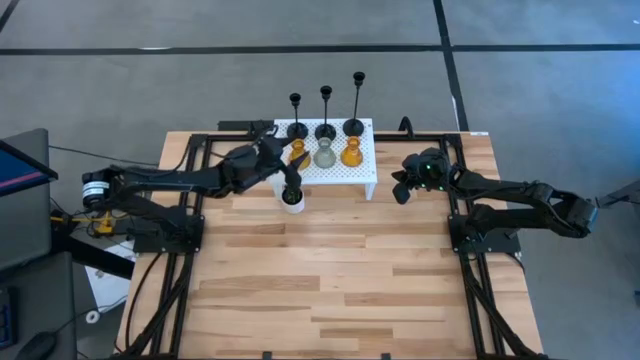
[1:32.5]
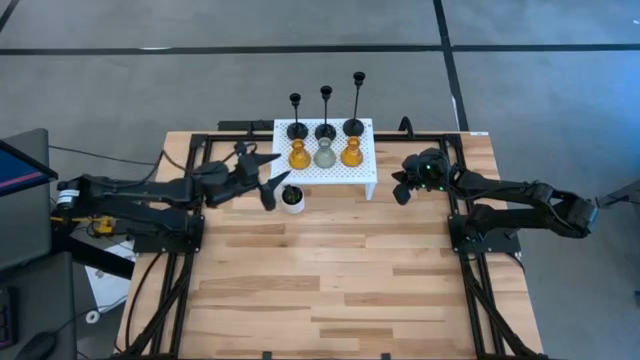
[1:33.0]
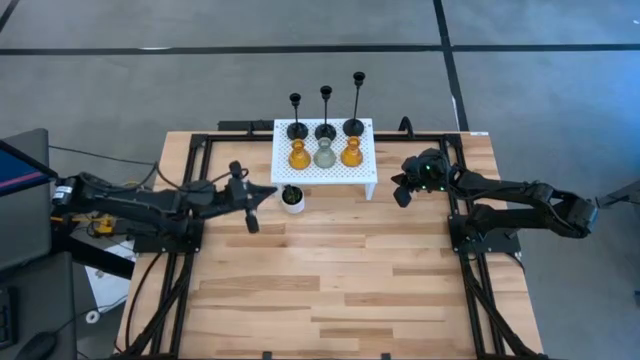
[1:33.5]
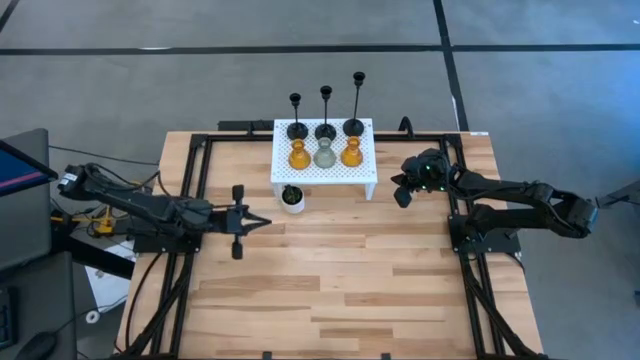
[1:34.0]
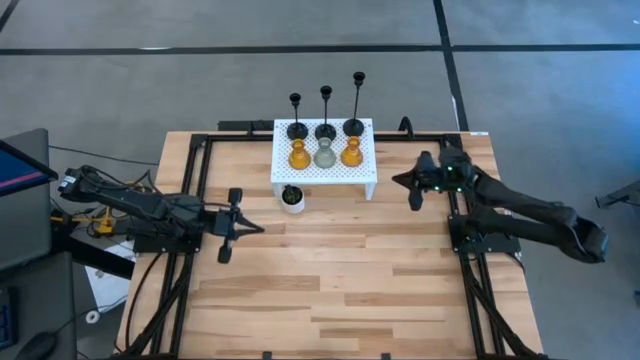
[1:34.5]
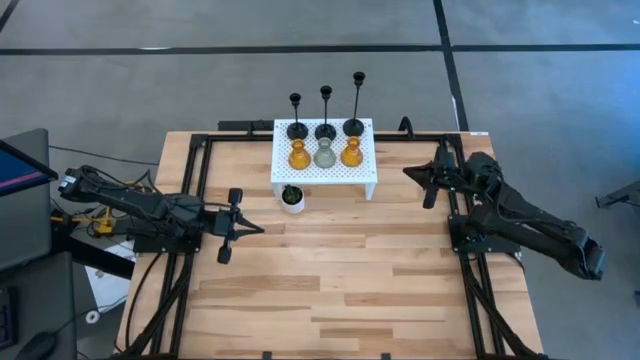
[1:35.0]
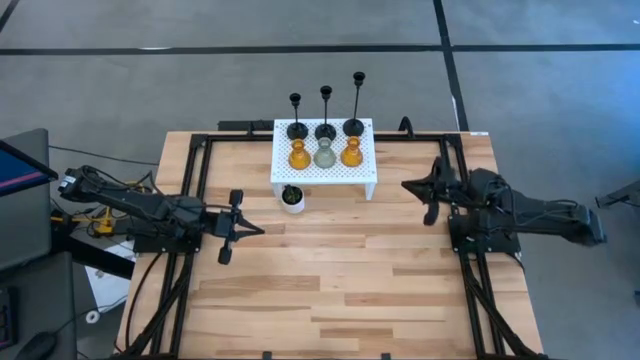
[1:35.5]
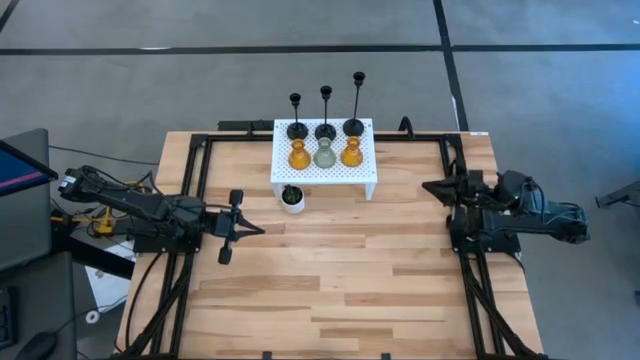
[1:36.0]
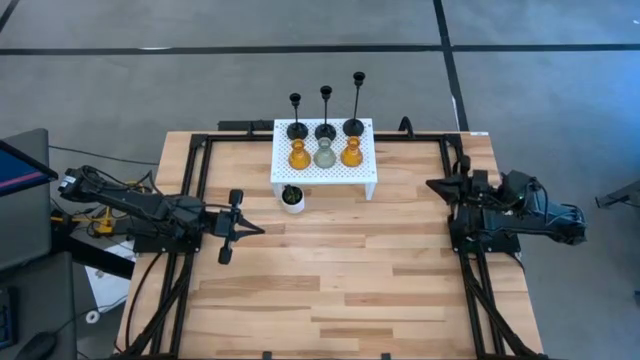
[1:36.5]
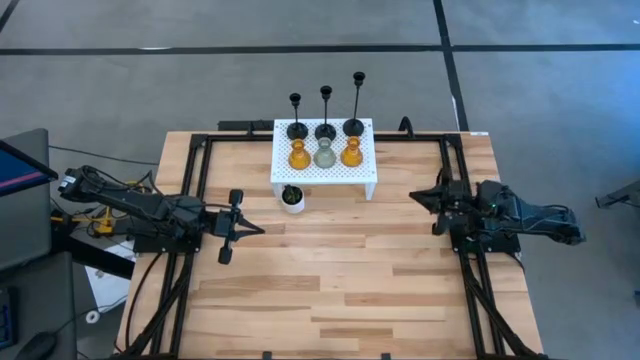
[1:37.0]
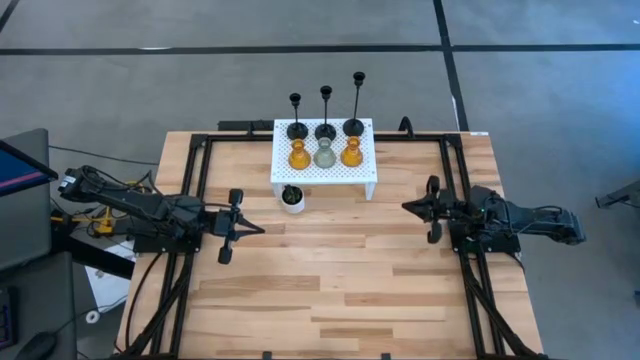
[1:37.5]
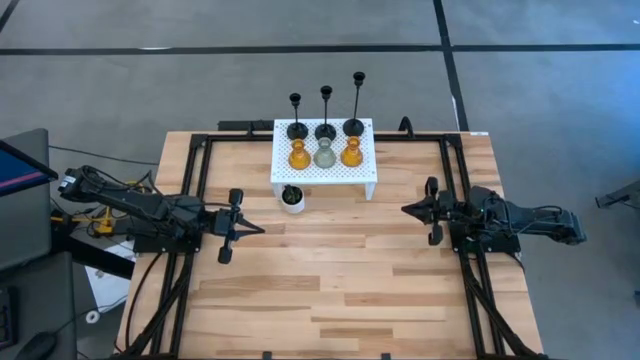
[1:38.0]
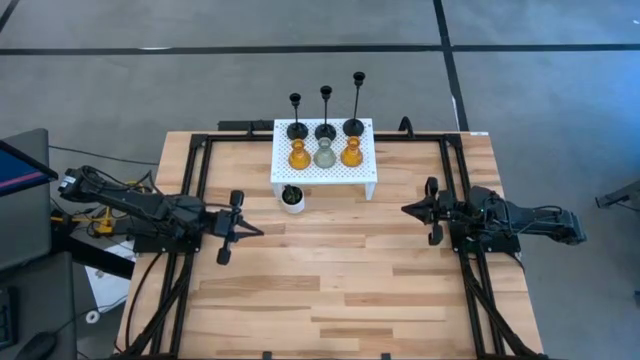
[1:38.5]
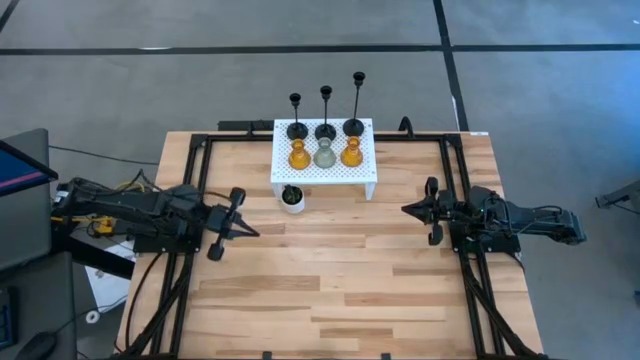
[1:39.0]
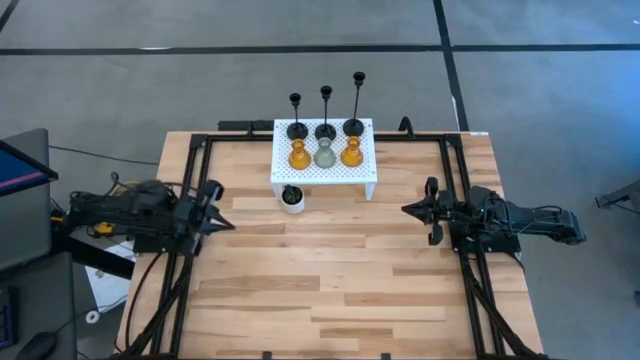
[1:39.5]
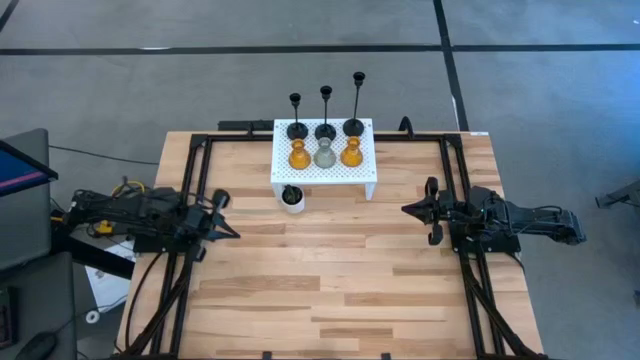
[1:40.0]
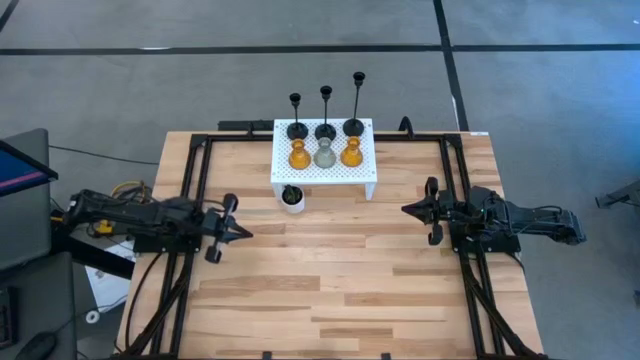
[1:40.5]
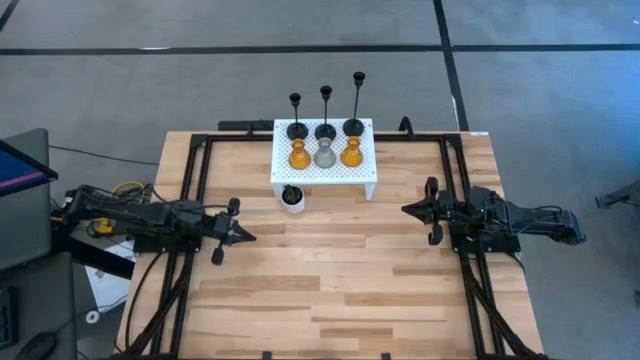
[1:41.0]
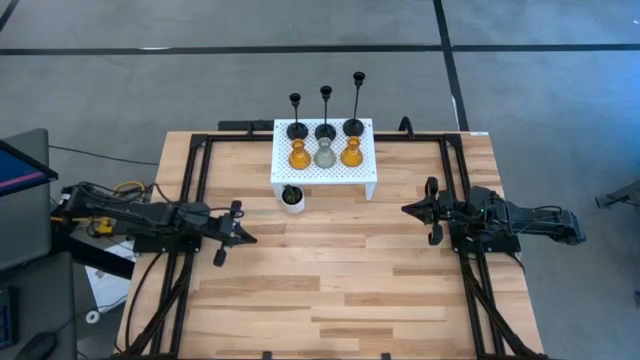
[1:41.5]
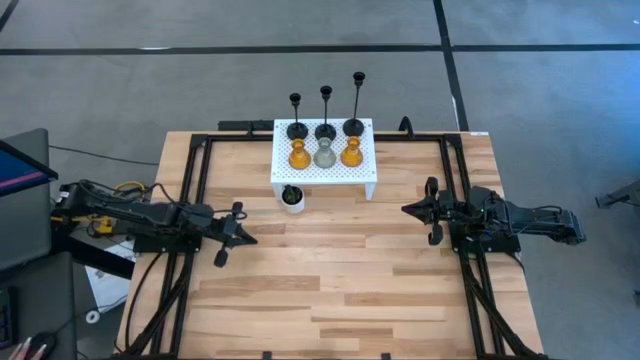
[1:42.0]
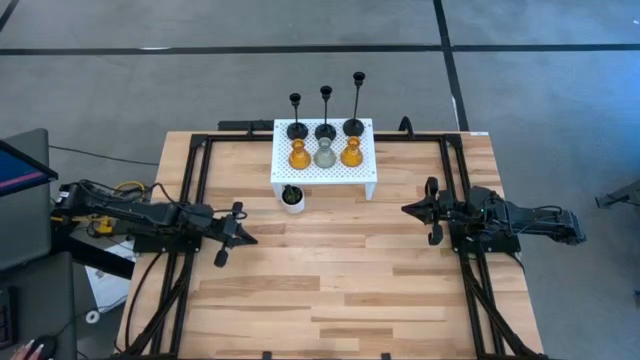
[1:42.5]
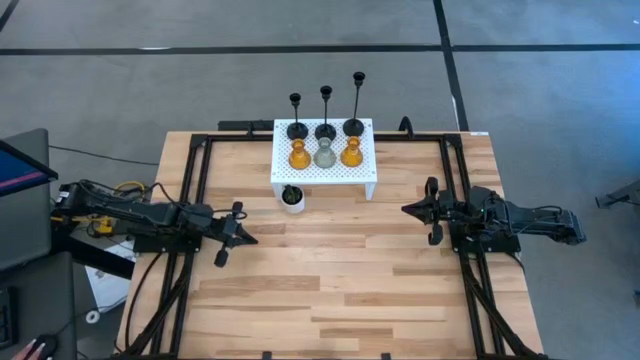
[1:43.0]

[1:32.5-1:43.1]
Task: Pick & Place candle stick holders
Return to Home Position

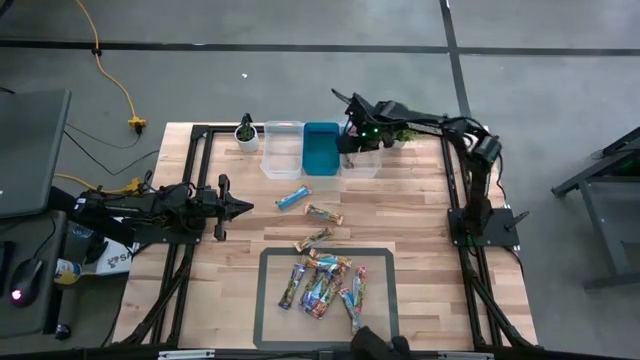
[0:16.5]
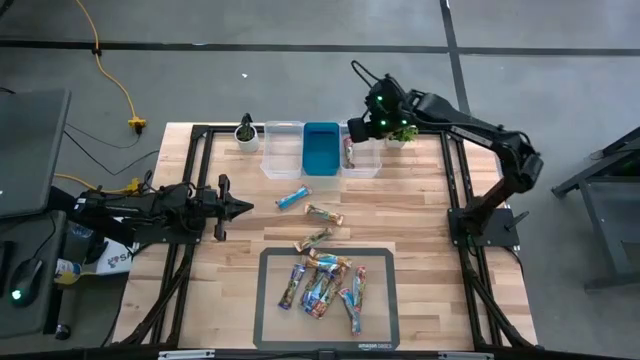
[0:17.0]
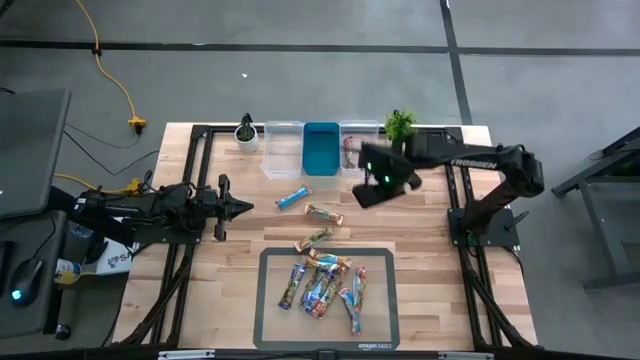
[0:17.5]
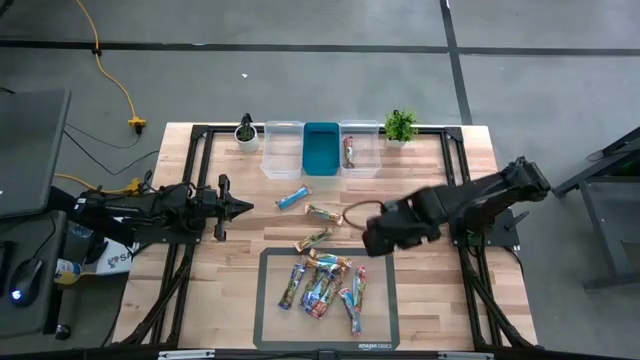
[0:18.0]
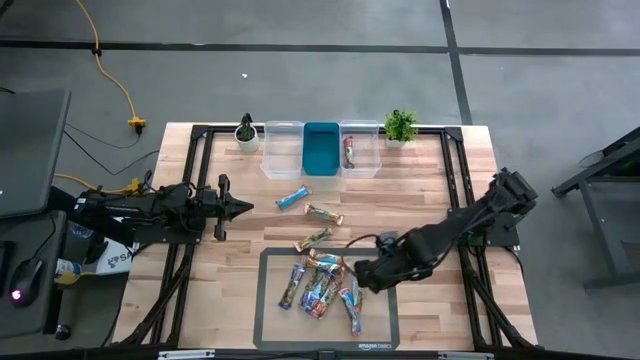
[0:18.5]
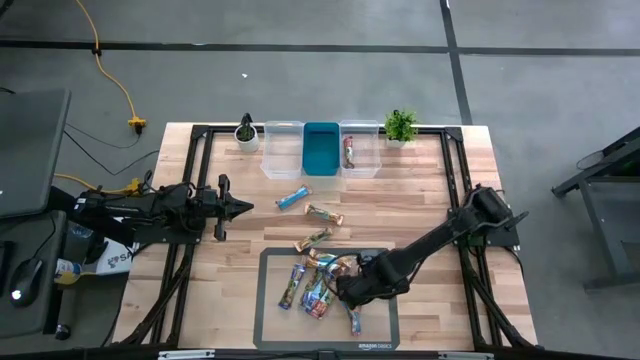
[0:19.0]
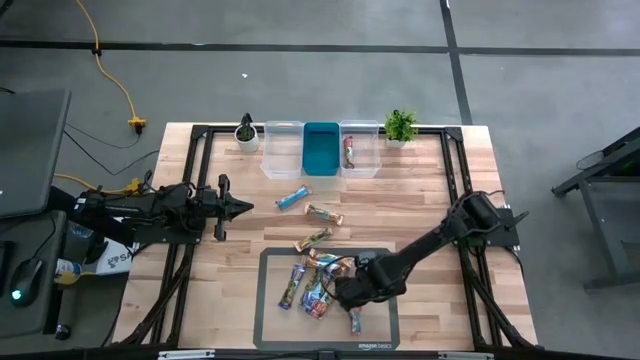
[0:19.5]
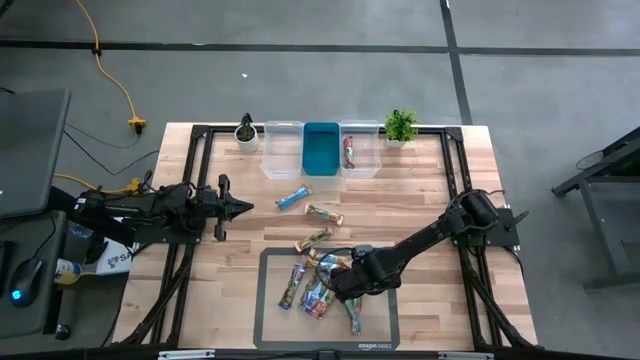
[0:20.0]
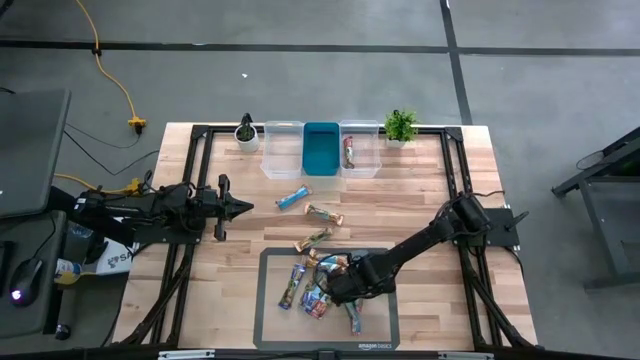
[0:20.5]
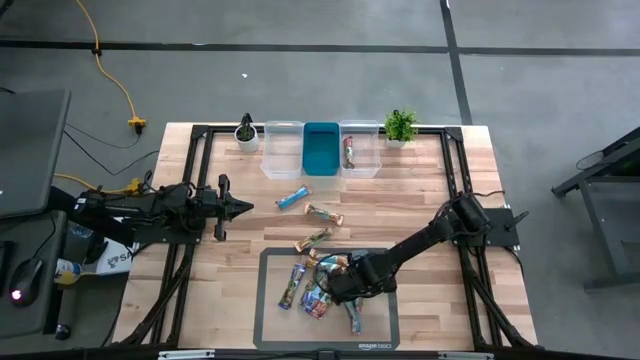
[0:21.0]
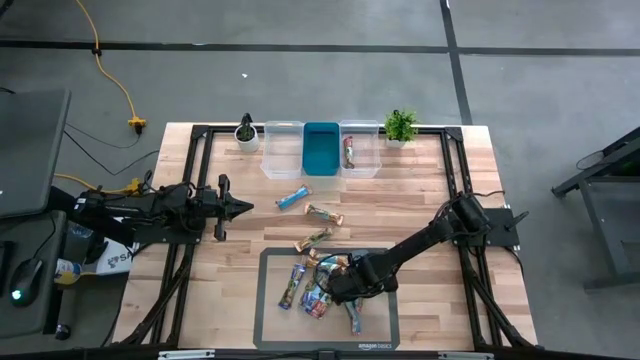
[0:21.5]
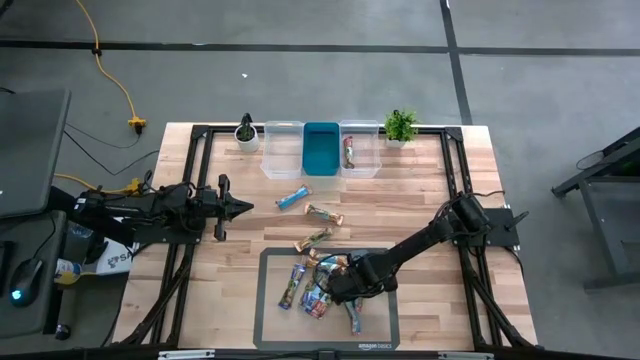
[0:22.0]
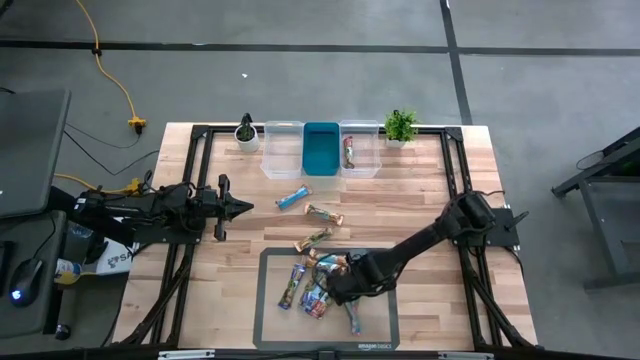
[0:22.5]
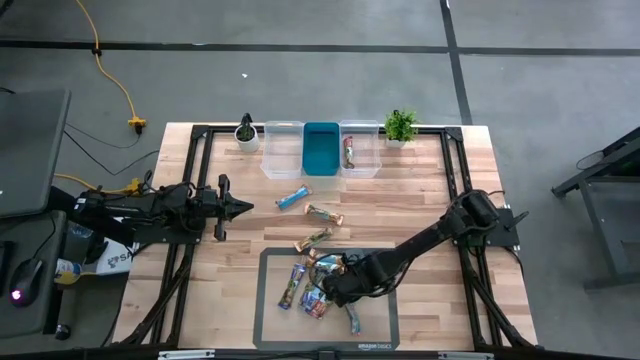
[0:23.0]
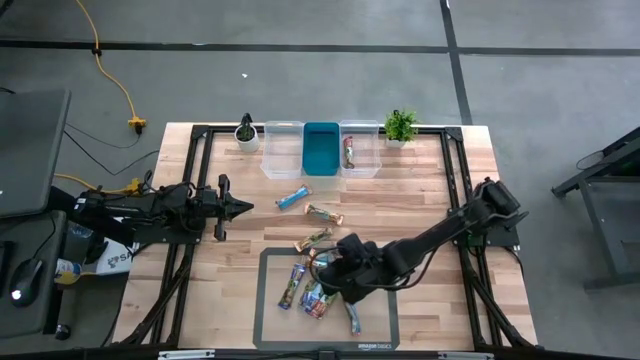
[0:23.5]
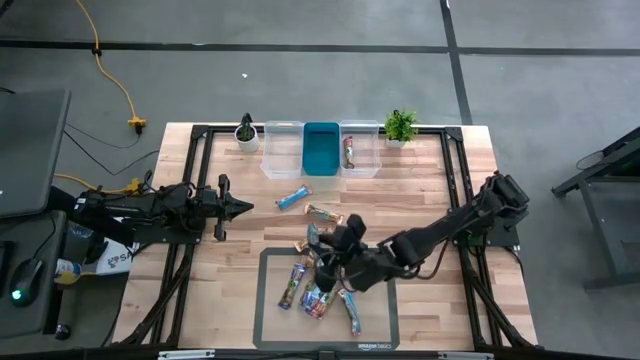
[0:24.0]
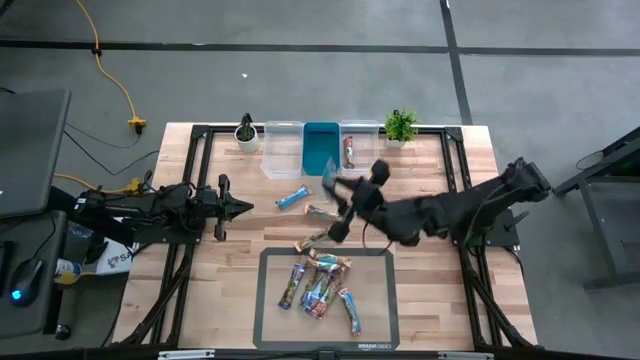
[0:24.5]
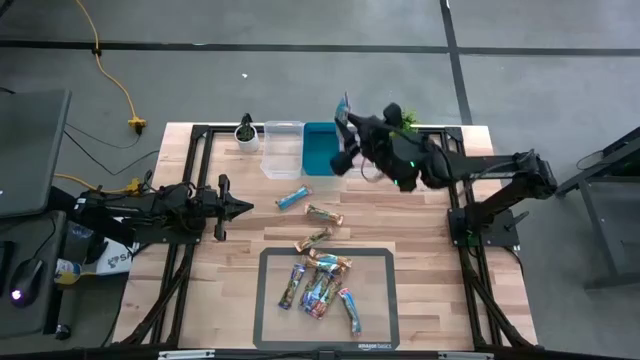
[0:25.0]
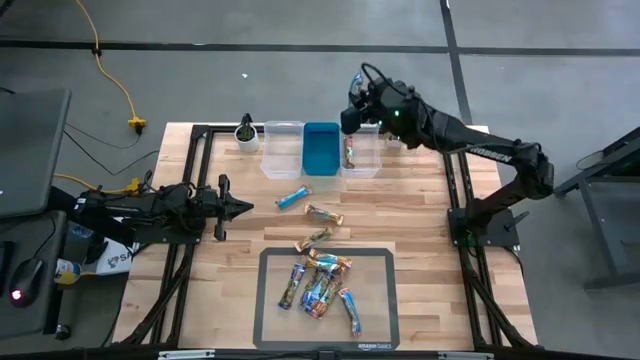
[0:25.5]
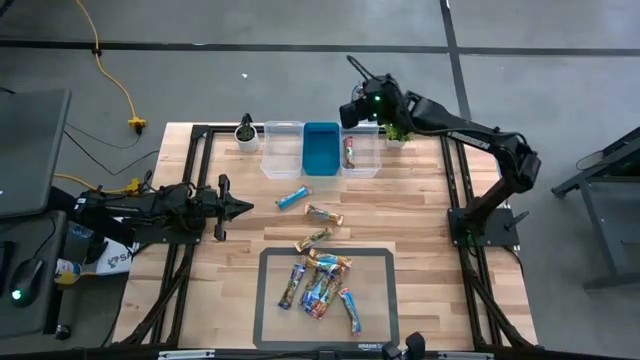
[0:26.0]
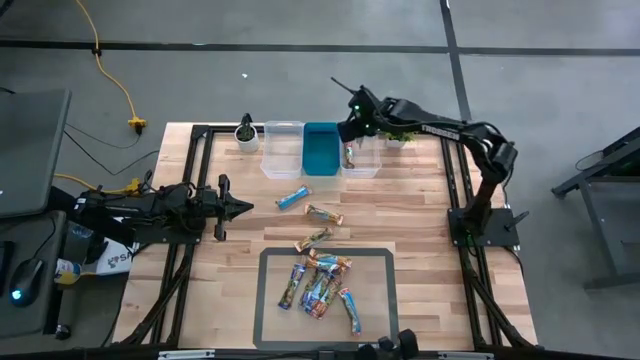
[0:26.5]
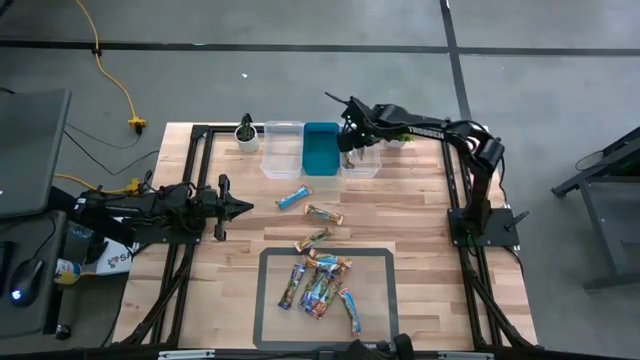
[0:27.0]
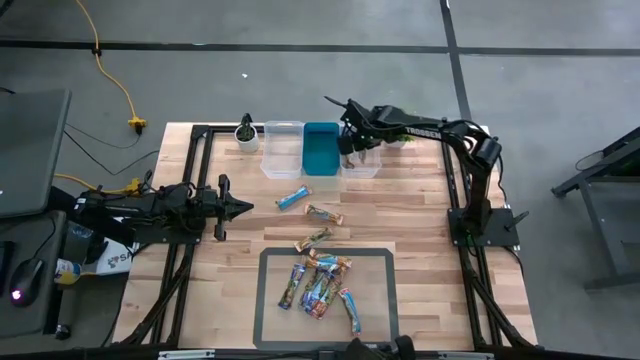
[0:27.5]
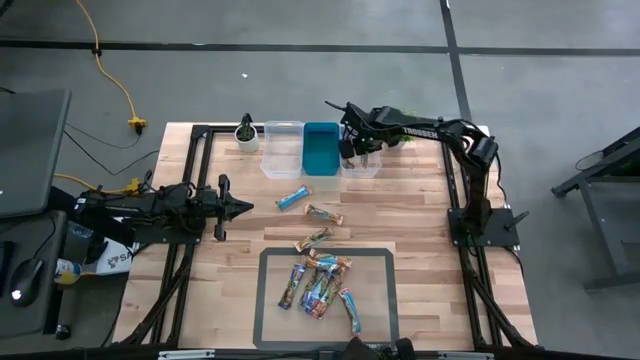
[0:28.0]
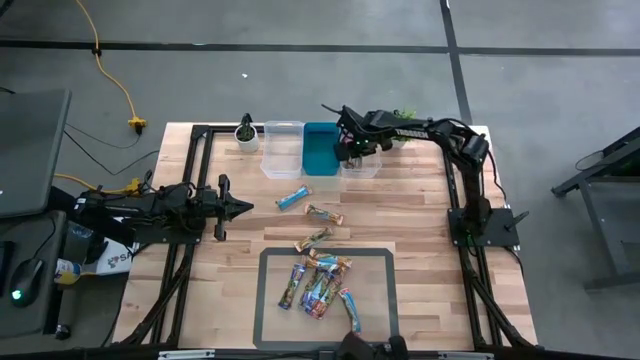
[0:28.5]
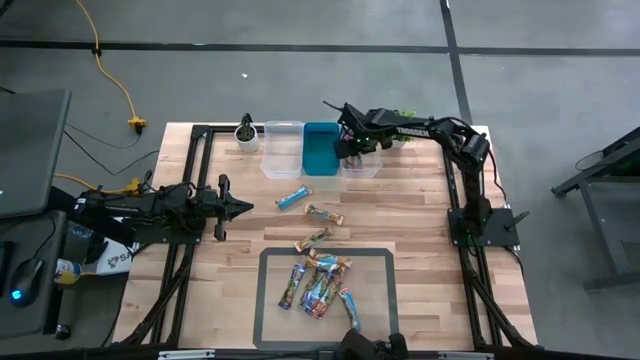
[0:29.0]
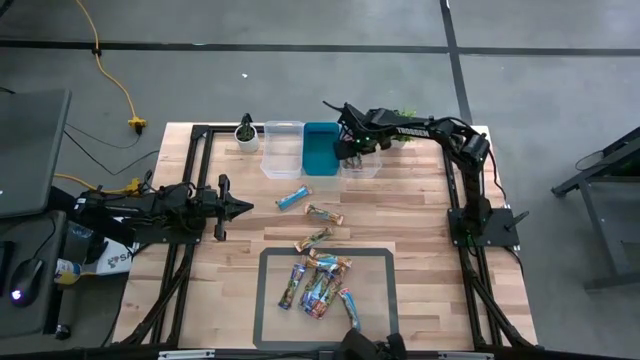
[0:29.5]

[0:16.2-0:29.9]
Task: Pick and place Granola Bars by type
Put the red granola bar into the right transparent bin
